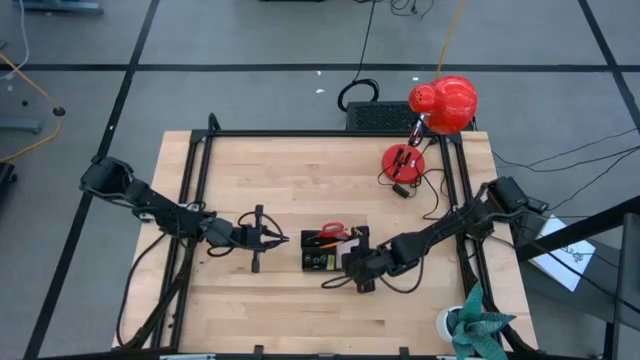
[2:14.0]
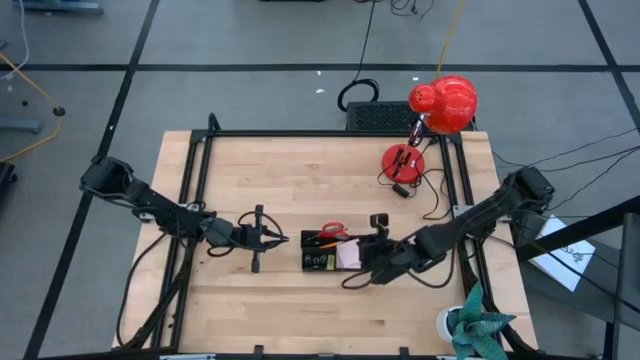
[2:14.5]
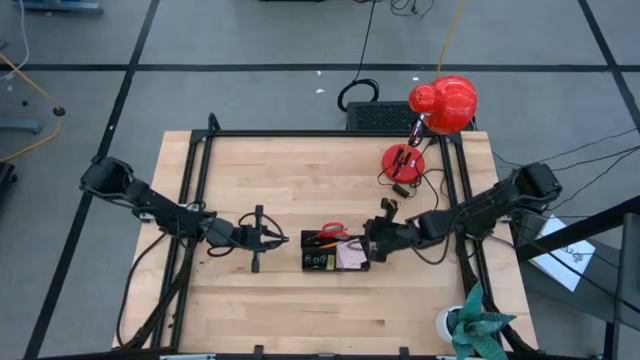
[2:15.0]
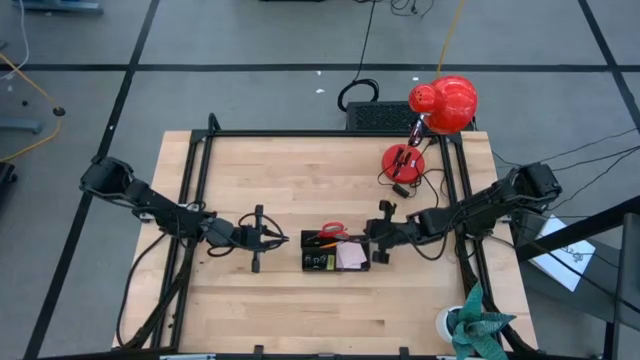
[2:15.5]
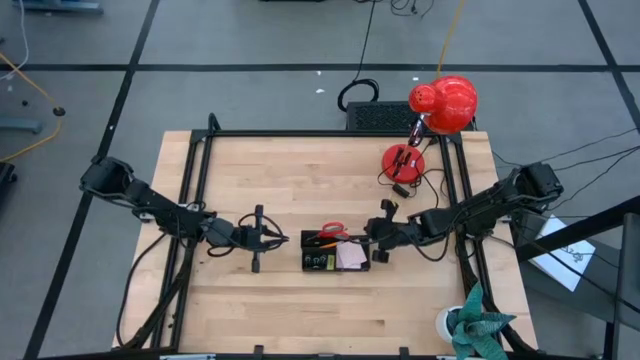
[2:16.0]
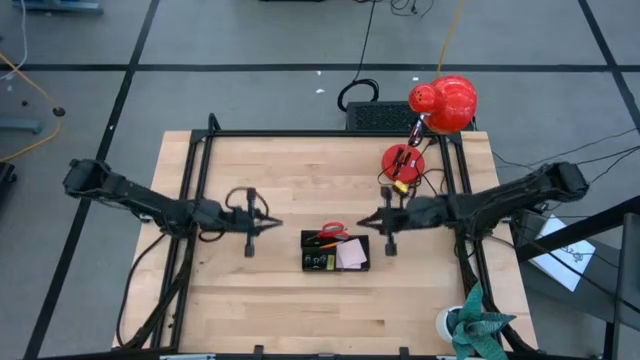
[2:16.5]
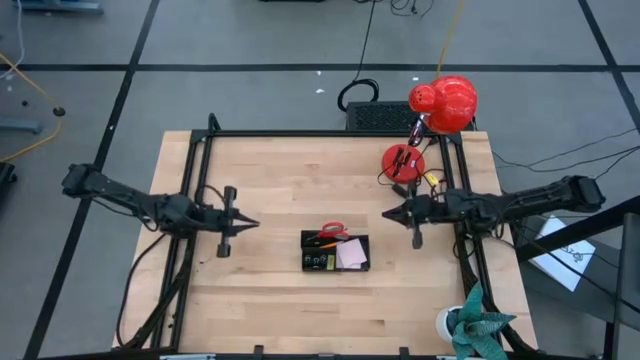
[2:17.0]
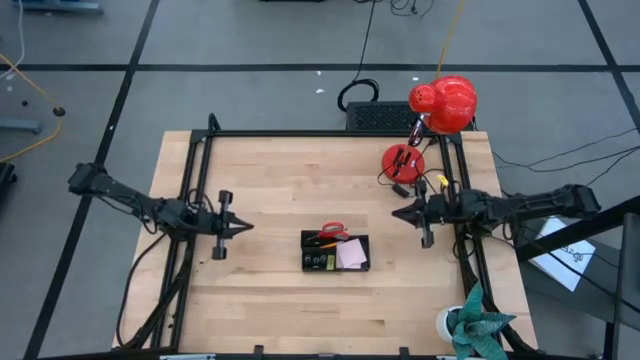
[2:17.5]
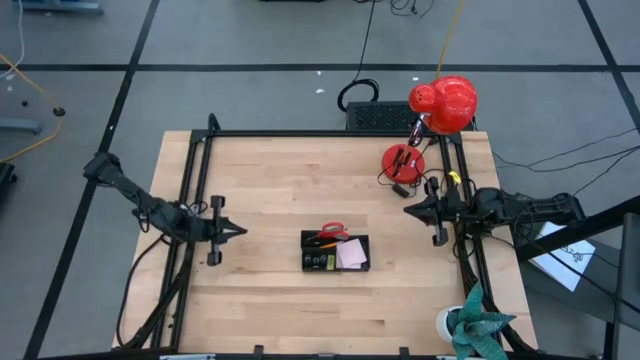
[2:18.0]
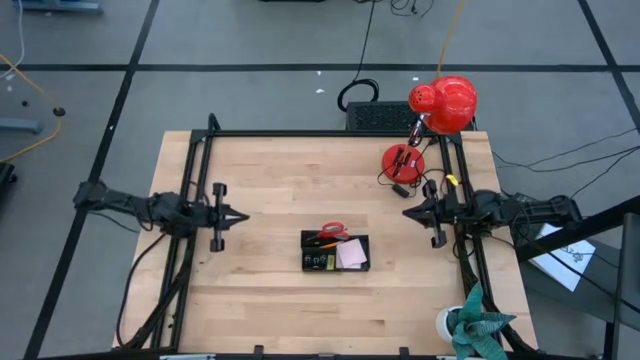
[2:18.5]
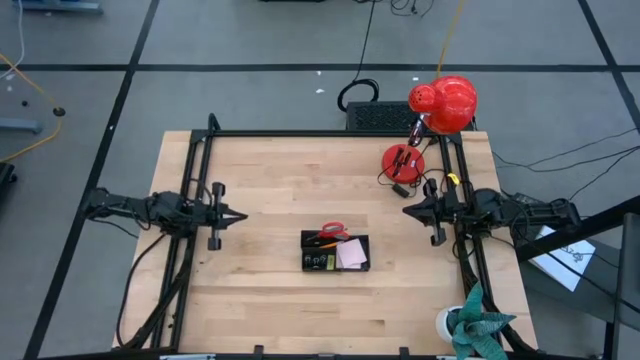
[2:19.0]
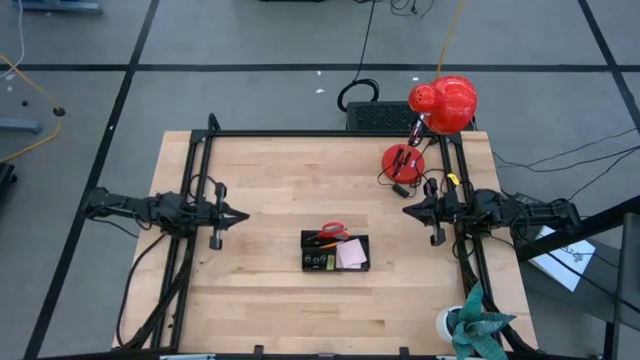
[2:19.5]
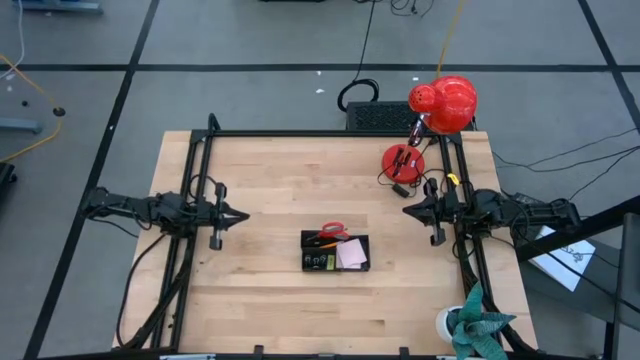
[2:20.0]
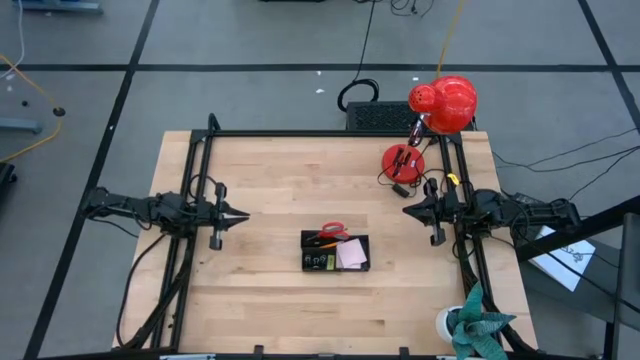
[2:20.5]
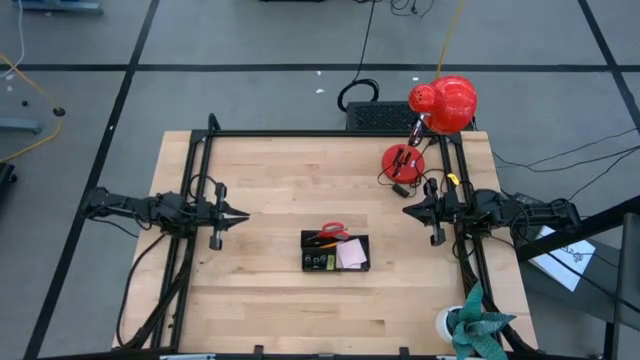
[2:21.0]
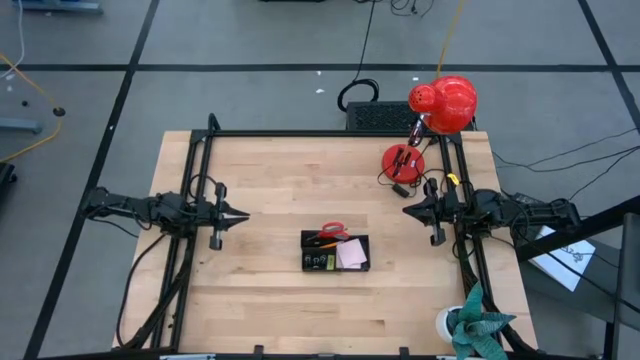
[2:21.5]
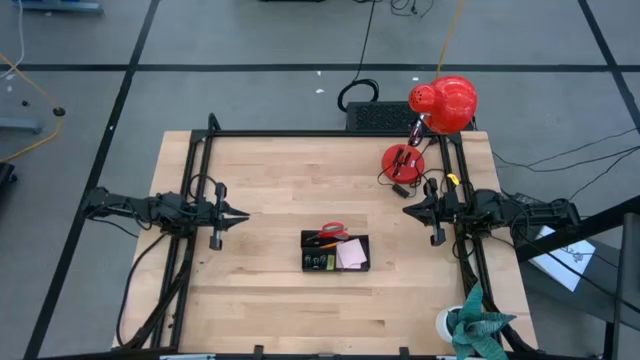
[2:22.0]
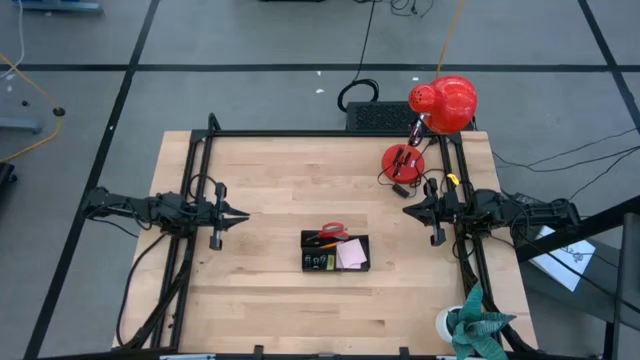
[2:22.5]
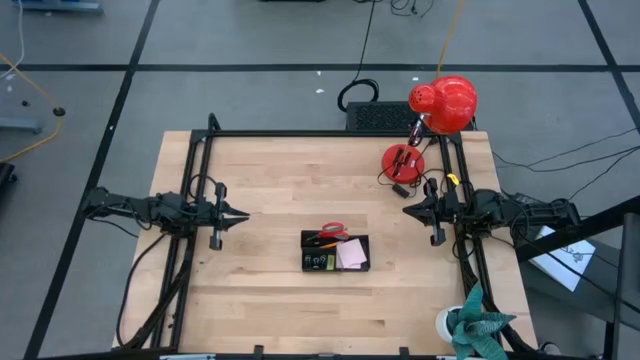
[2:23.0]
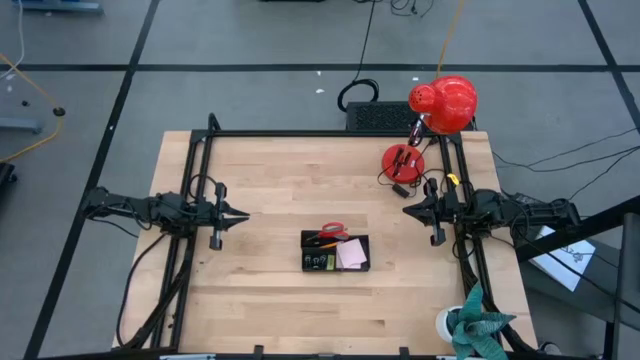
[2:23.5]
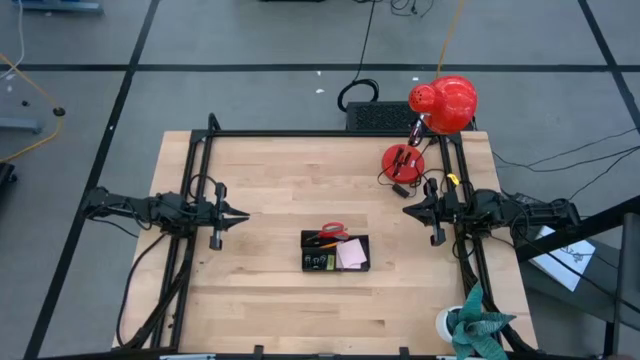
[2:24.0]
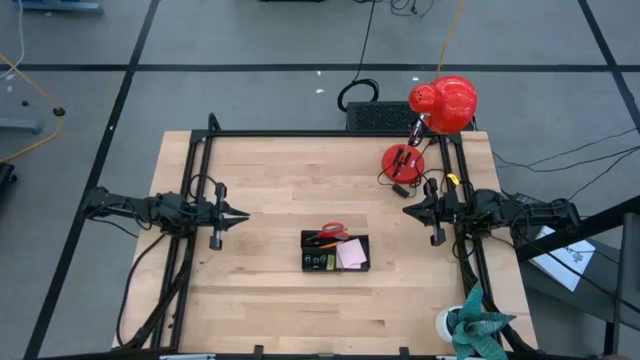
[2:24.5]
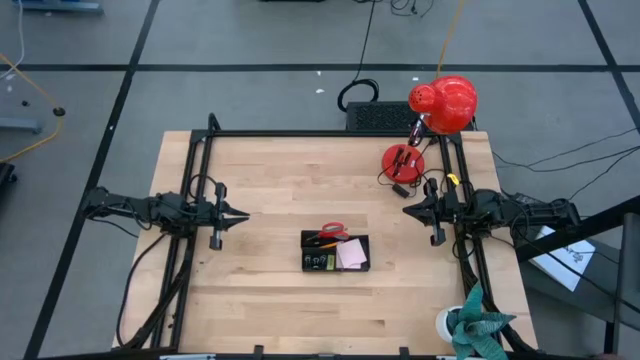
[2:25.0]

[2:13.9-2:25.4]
Task: Pick and place office supplies into organizer
Return to Home Position

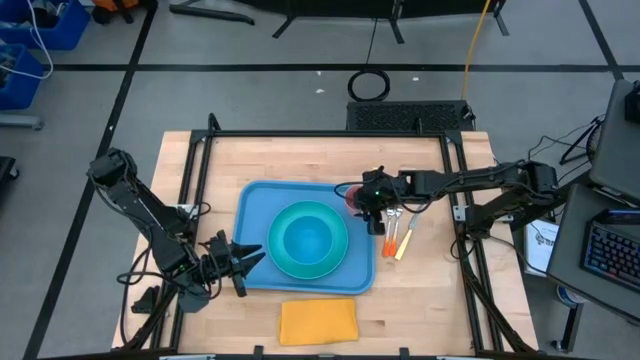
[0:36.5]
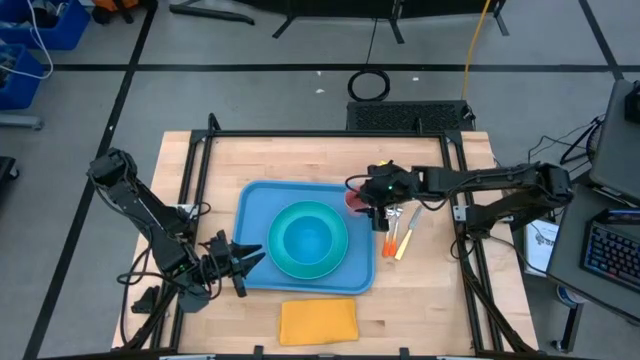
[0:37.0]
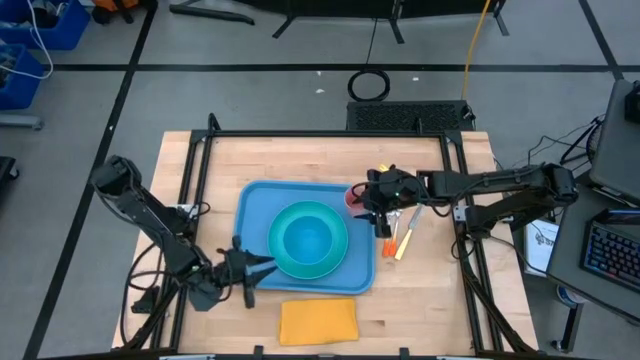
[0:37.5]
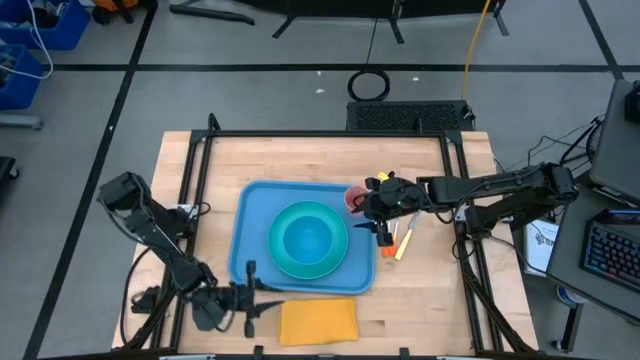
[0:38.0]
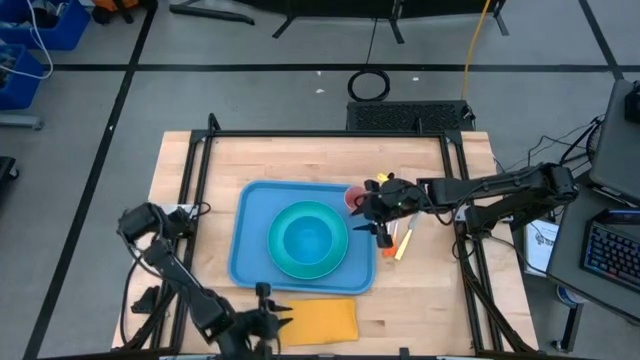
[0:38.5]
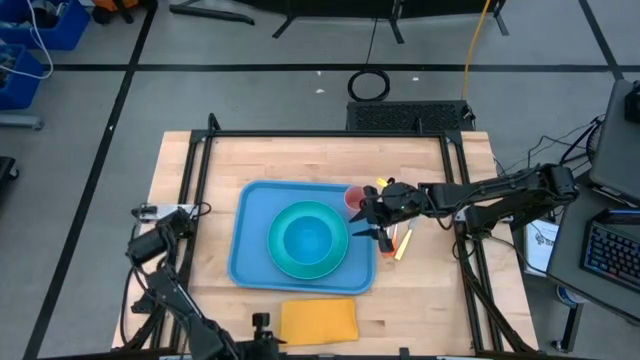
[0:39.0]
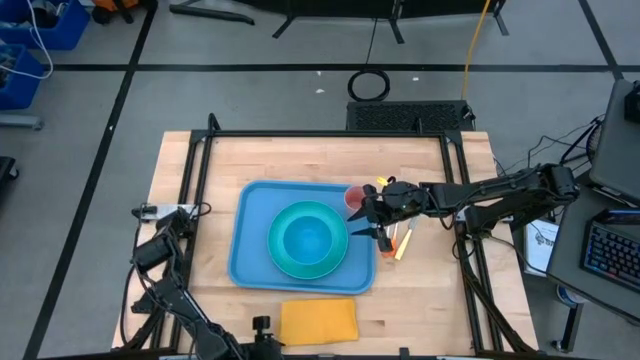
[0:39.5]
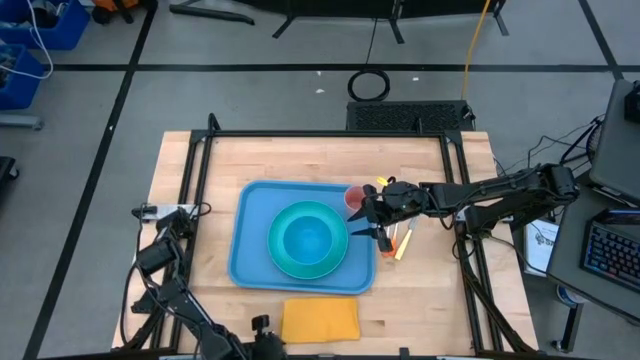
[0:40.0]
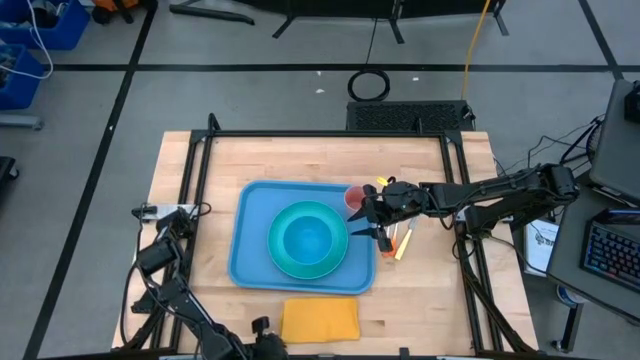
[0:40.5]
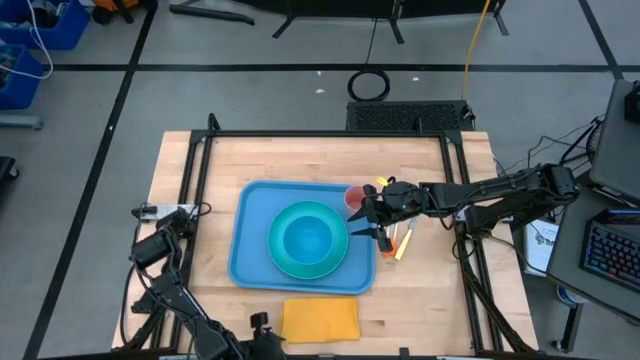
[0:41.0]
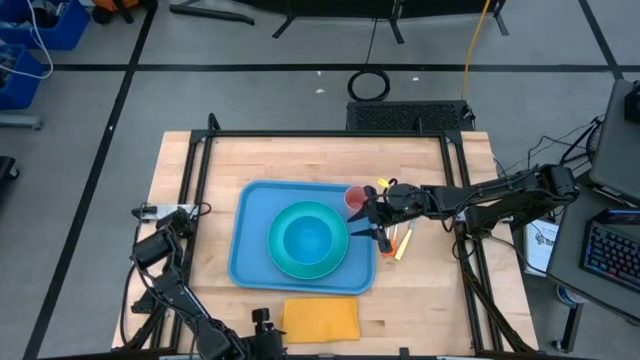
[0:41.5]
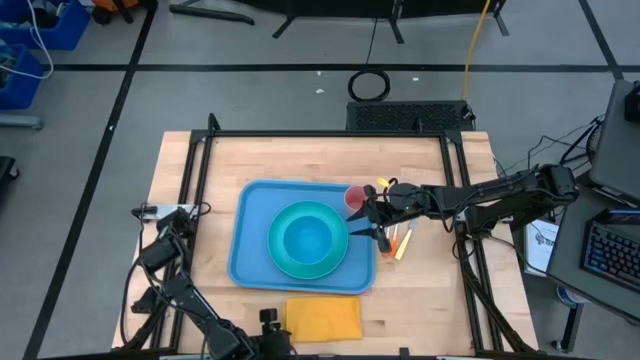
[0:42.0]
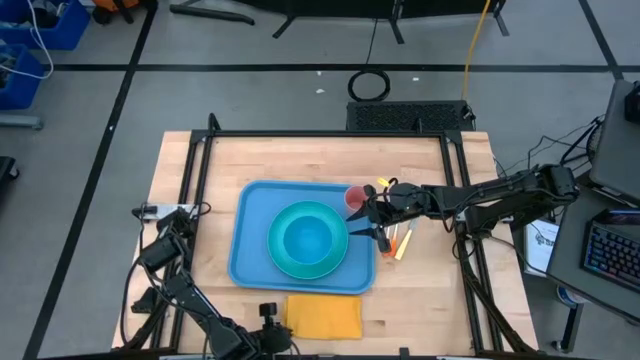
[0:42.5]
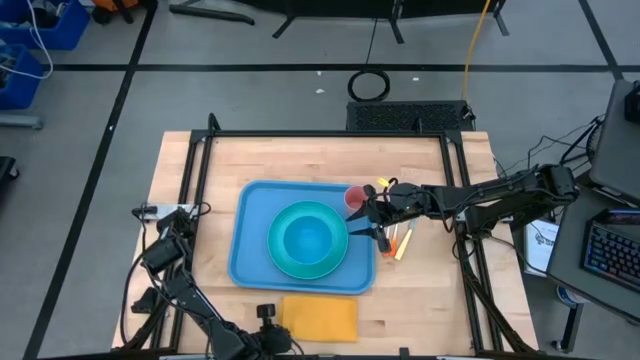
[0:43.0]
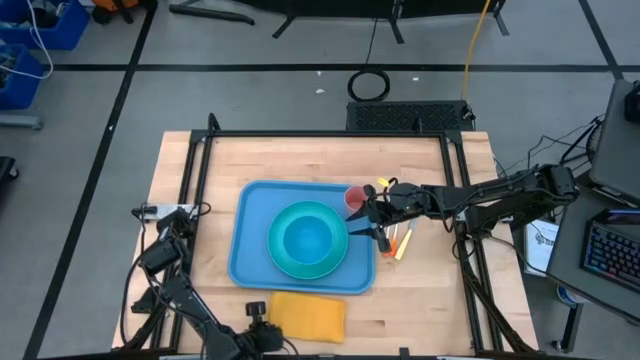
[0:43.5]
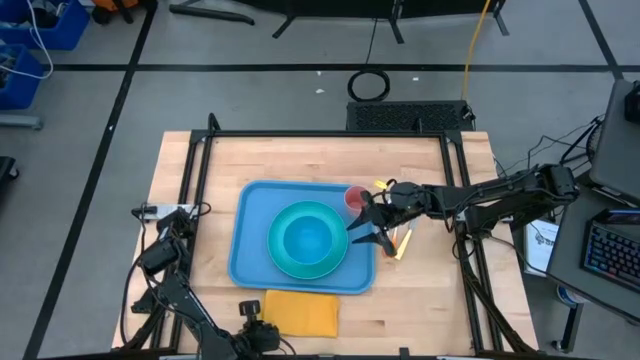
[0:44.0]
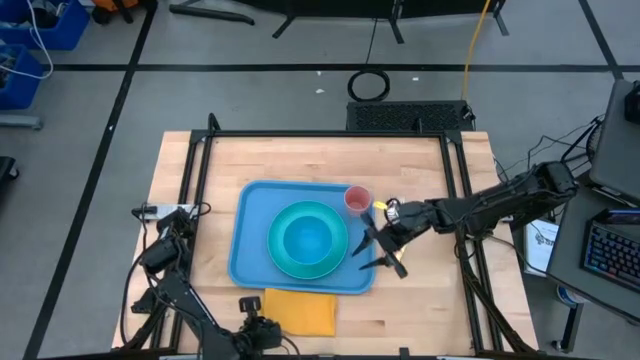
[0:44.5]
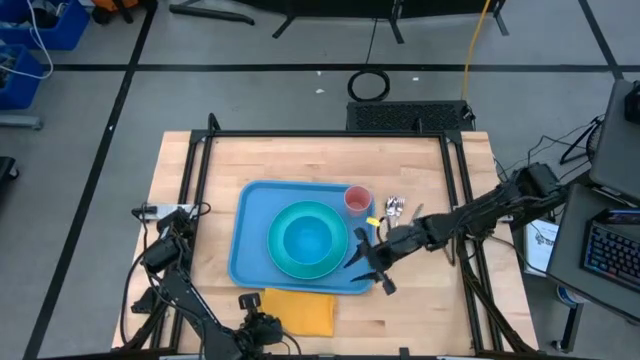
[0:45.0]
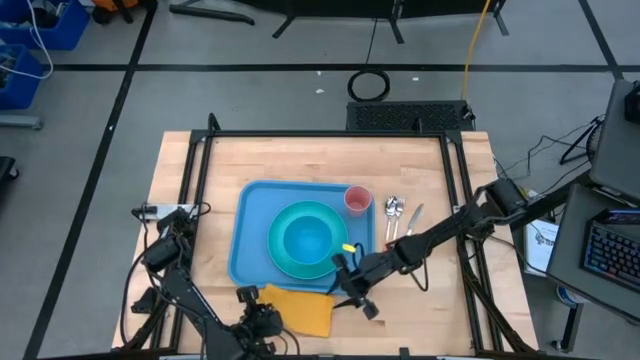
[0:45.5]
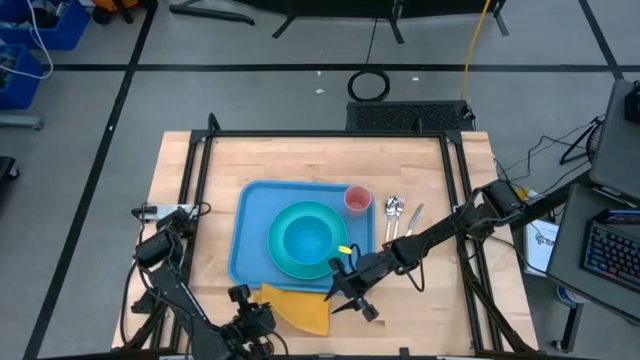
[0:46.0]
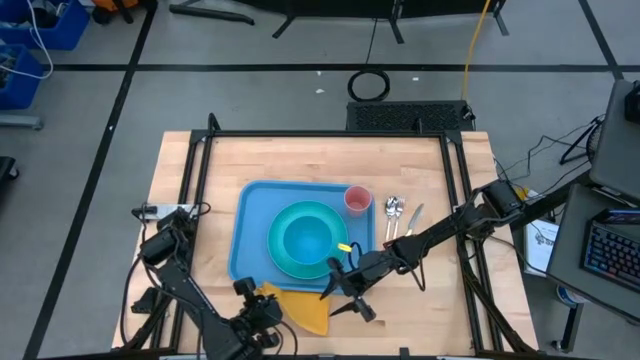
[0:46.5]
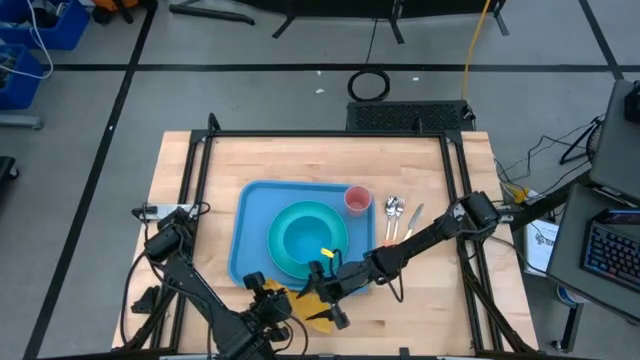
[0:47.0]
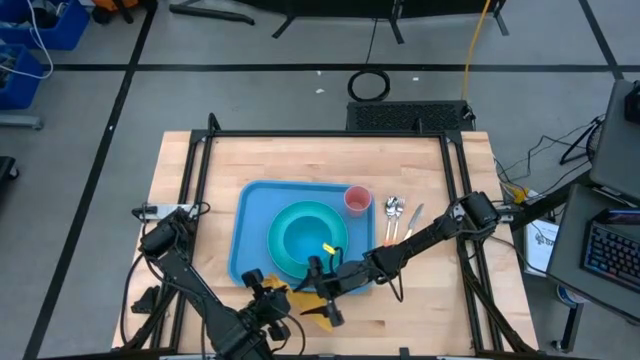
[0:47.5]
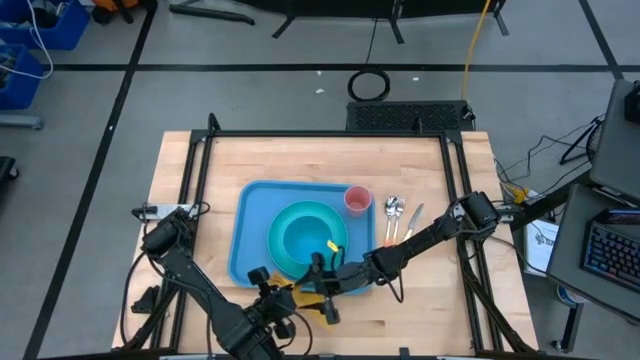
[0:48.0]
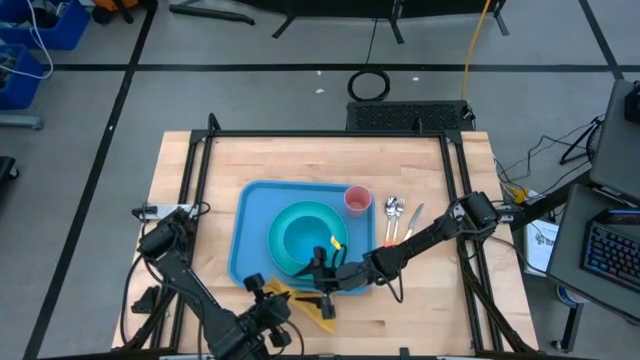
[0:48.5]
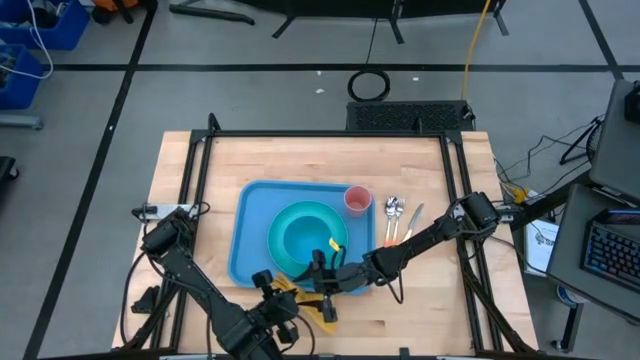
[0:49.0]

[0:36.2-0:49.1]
Task: Set up tray
Put the yellow napkin on the blue serving tray to the left of the green plate
